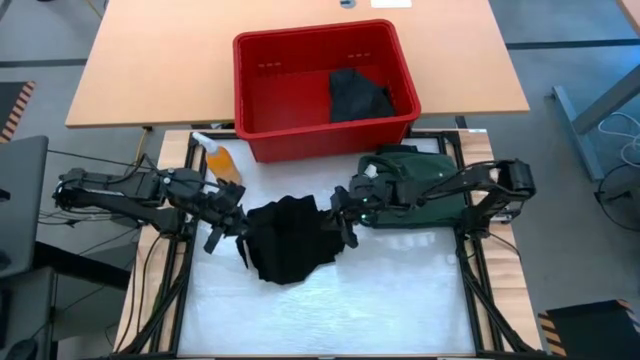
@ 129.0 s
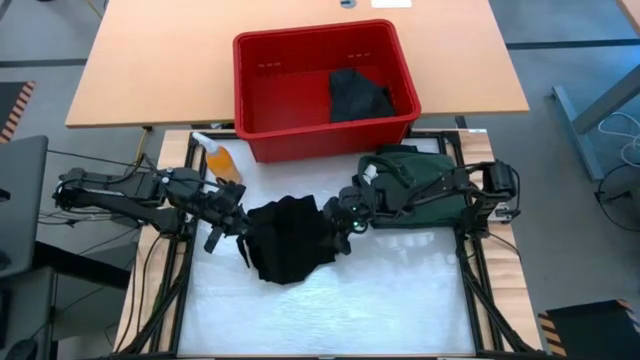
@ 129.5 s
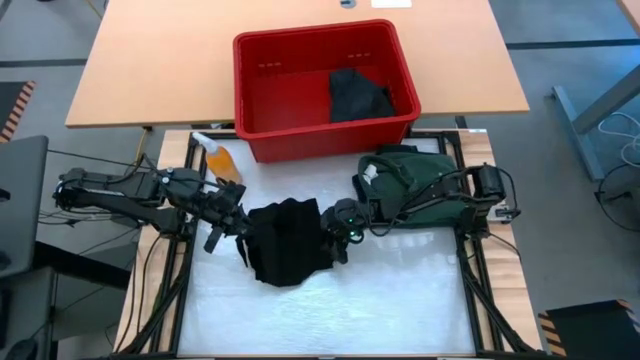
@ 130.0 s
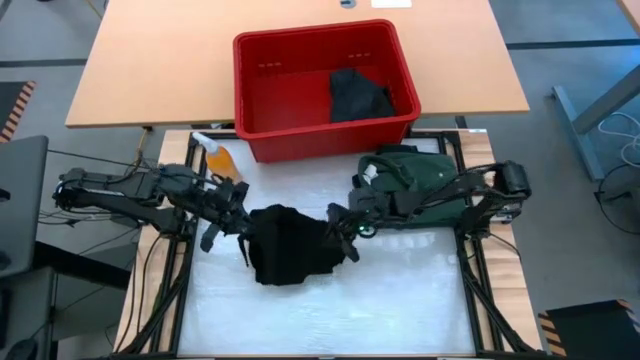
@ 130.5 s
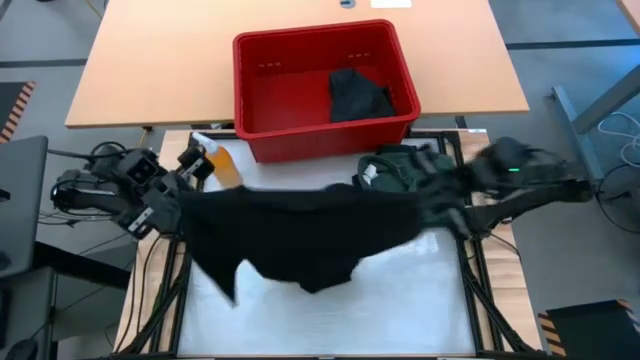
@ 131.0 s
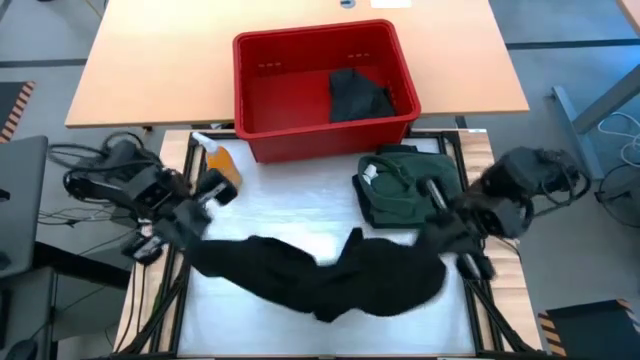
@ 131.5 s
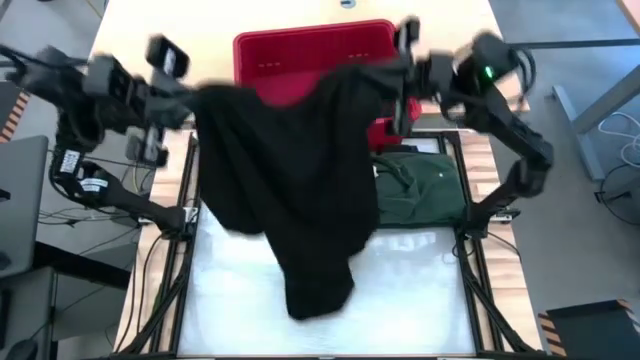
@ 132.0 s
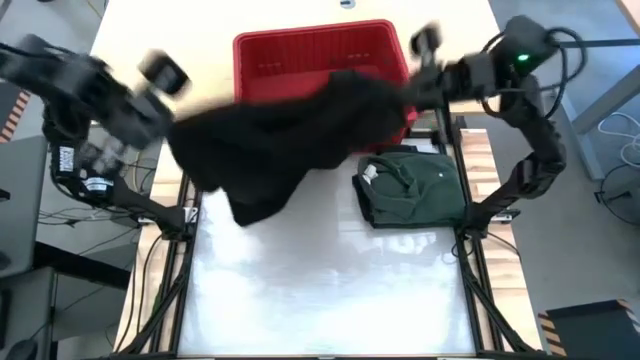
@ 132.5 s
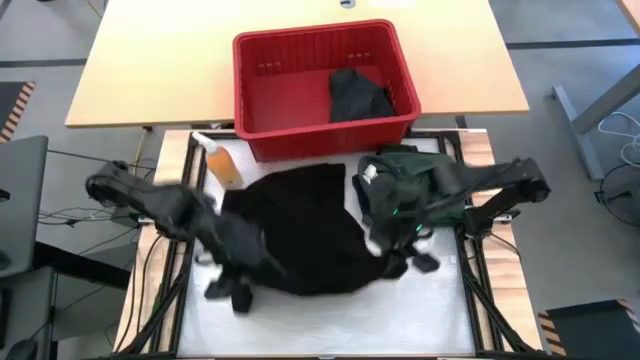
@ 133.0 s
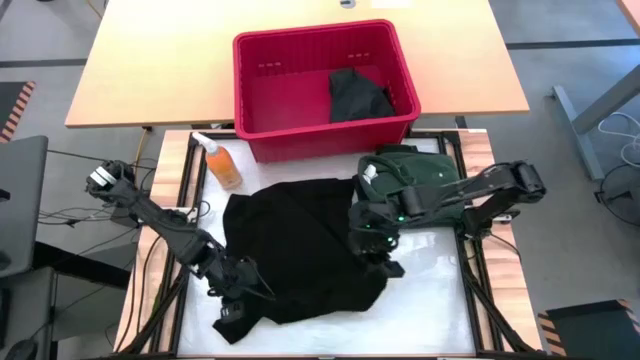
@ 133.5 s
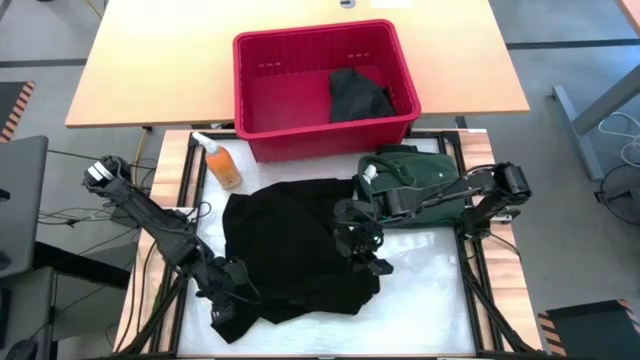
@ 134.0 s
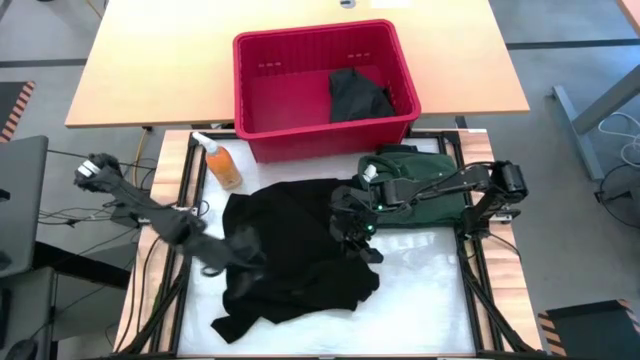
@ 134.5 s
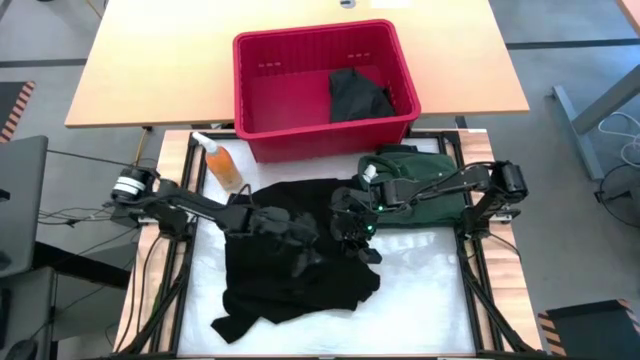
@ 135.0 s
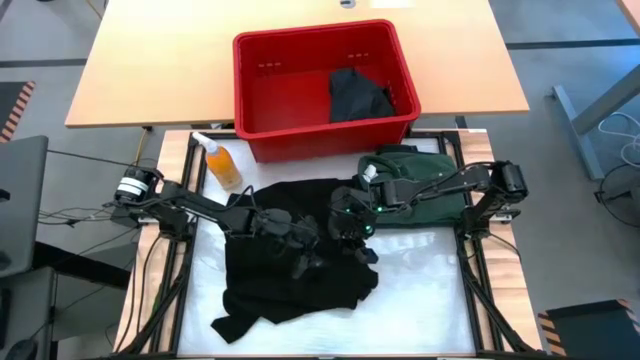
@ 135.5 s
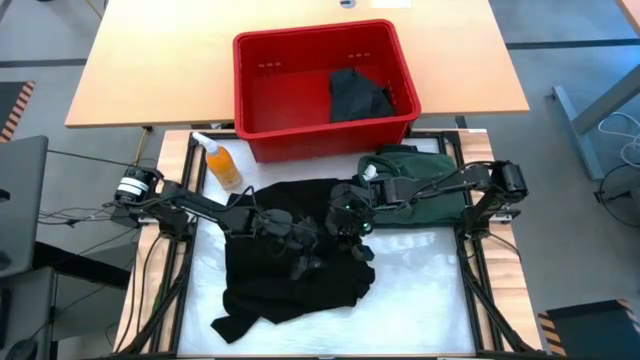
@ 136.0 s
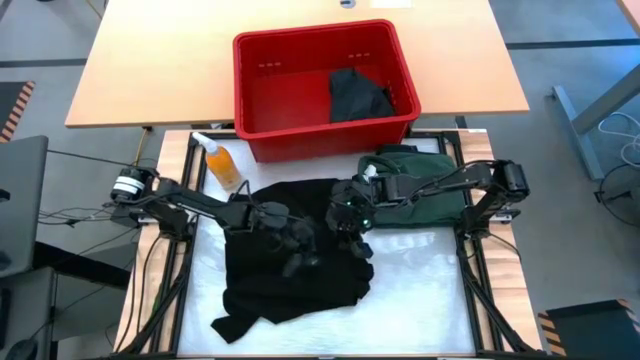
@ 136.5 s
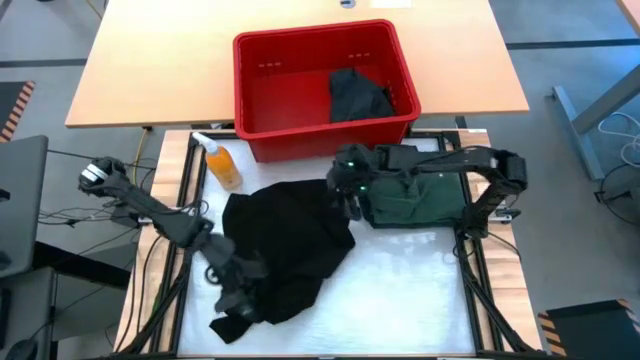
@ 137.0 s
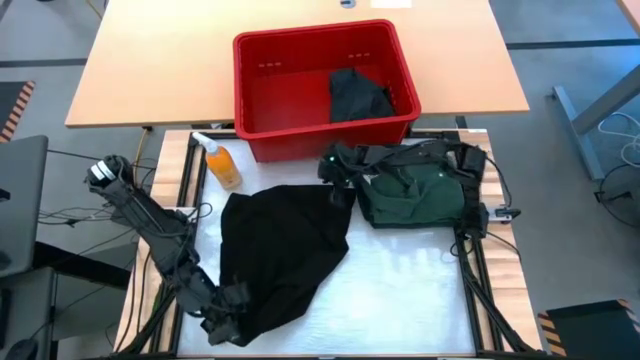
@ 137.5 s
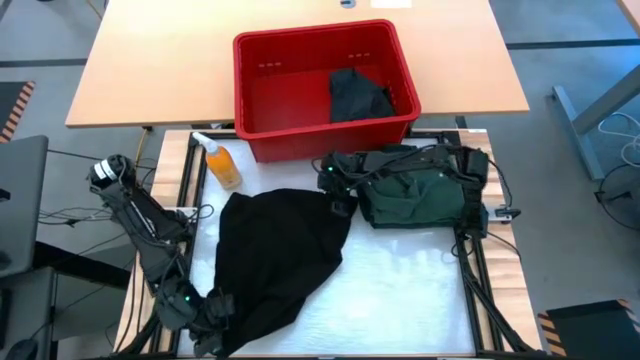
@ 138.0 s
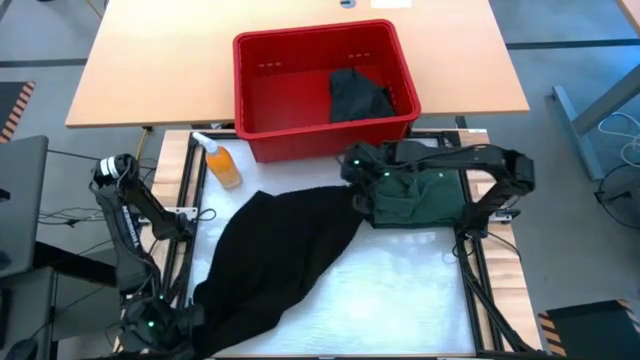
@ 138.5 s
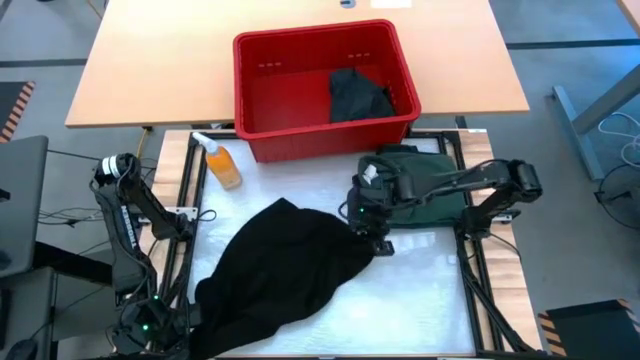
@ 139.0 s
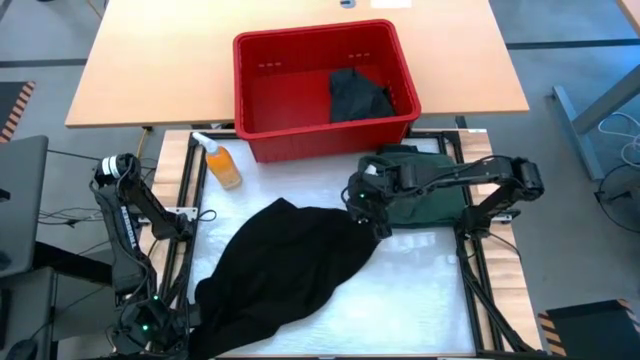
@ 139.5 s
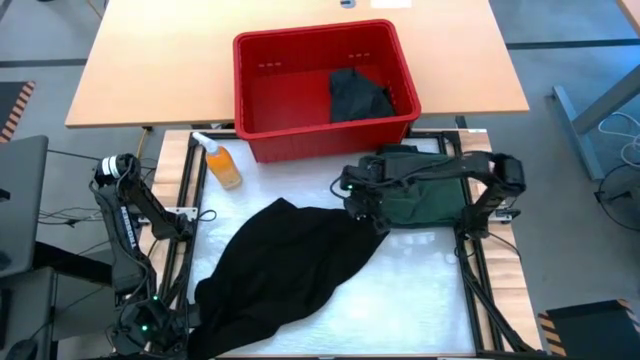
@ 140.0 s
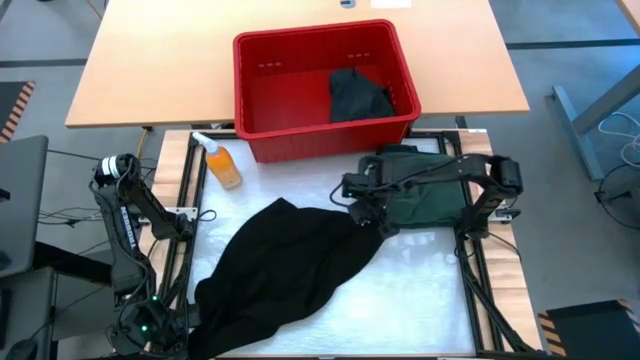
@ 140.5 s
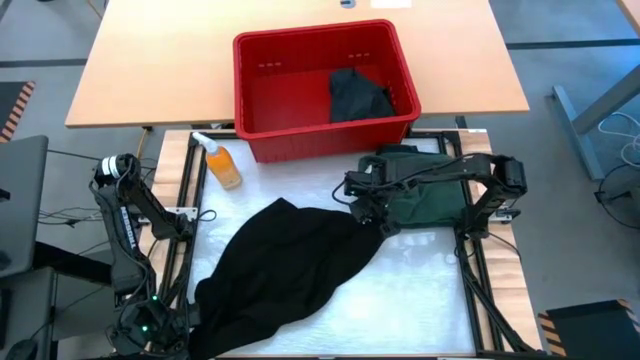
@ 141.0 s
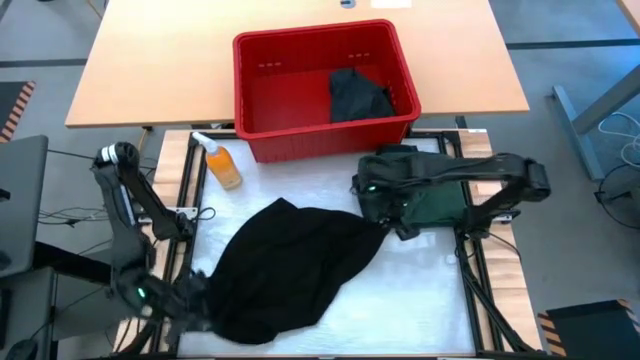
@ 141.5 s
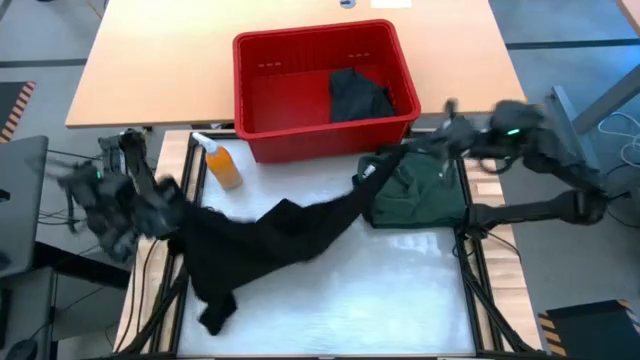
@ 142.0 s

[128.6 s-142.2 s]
Task: Fold laundry
Fold the black shirt
